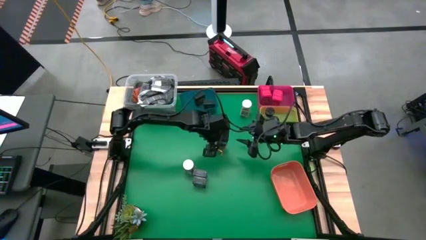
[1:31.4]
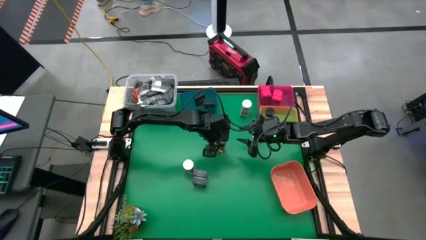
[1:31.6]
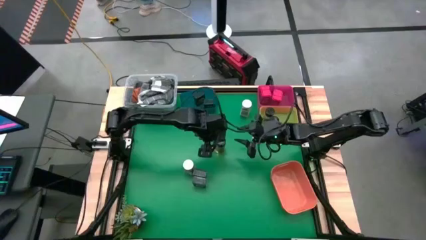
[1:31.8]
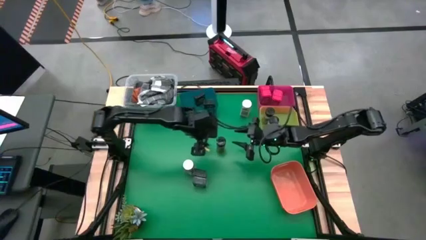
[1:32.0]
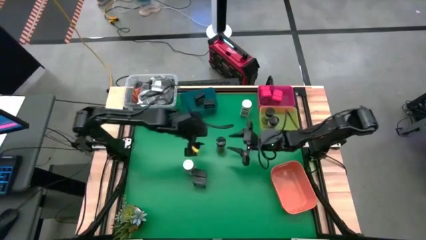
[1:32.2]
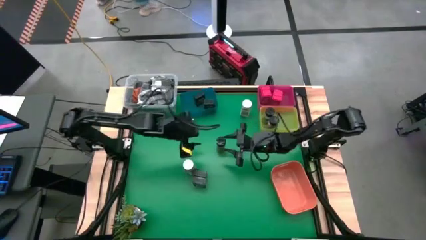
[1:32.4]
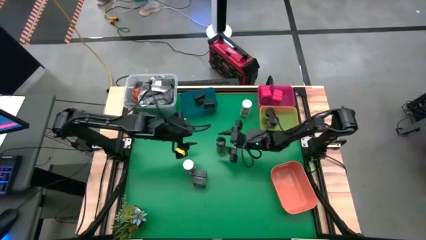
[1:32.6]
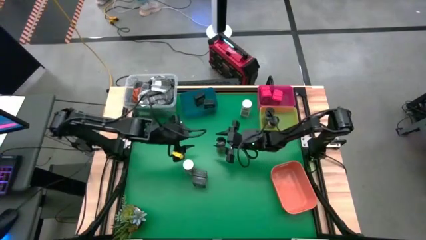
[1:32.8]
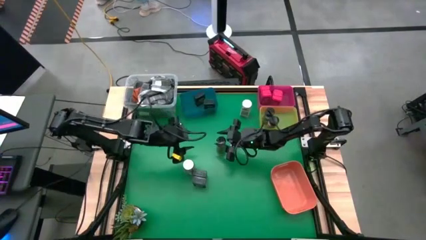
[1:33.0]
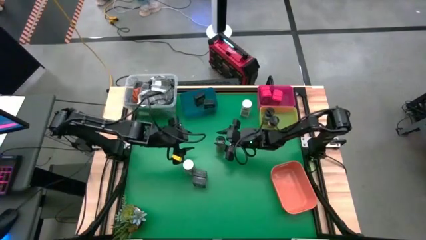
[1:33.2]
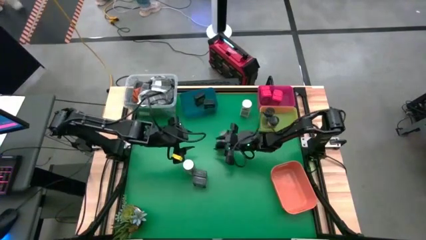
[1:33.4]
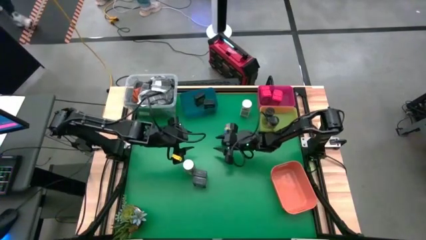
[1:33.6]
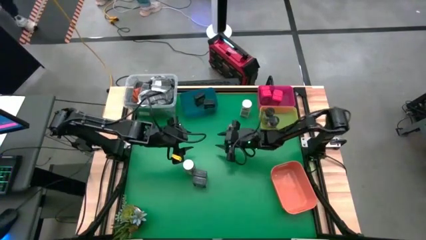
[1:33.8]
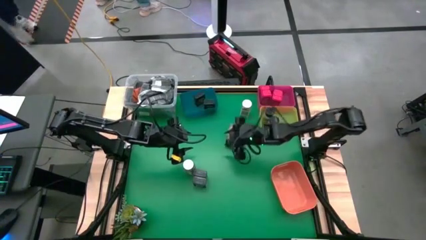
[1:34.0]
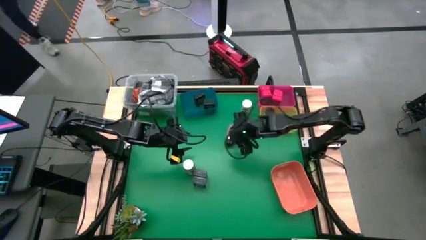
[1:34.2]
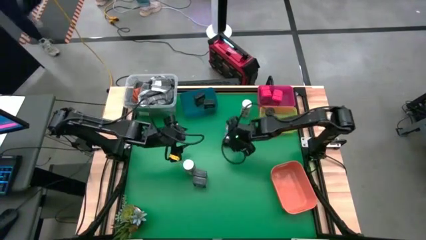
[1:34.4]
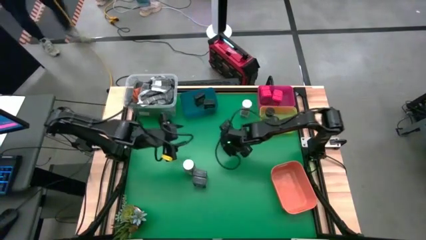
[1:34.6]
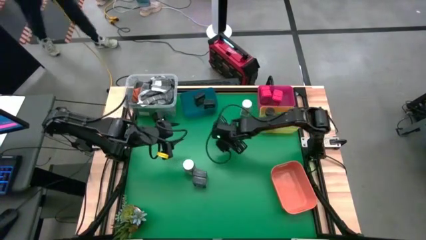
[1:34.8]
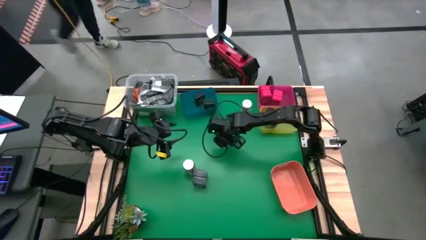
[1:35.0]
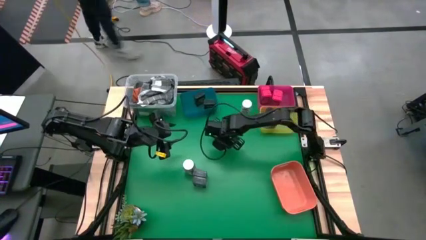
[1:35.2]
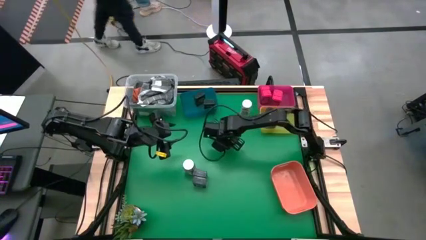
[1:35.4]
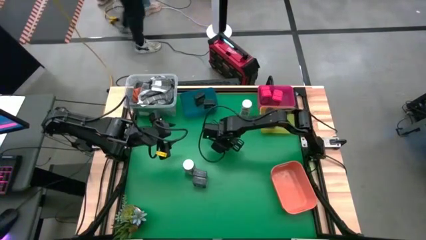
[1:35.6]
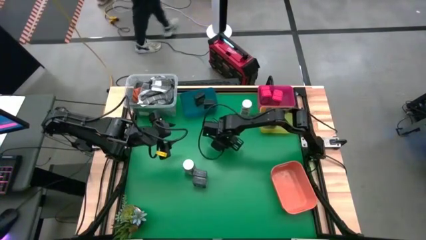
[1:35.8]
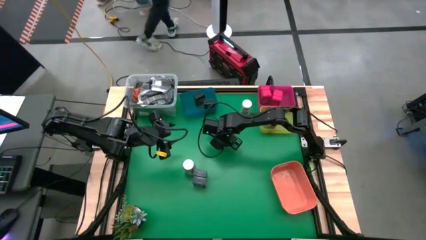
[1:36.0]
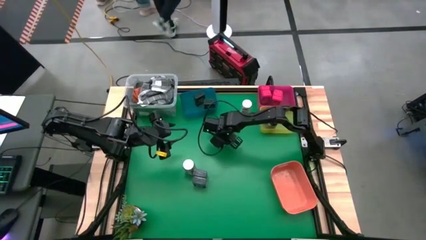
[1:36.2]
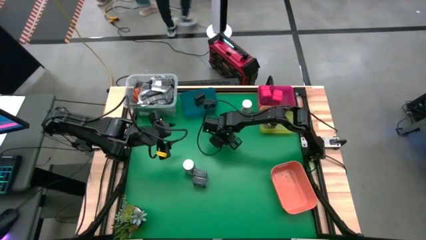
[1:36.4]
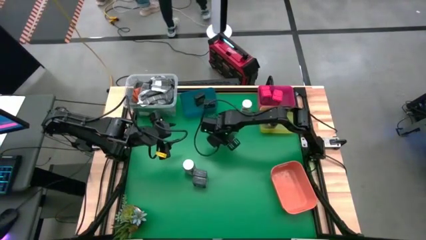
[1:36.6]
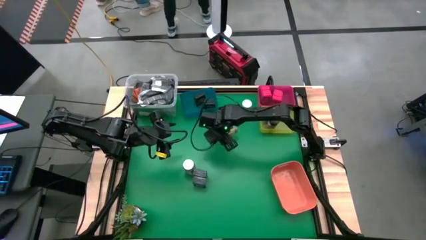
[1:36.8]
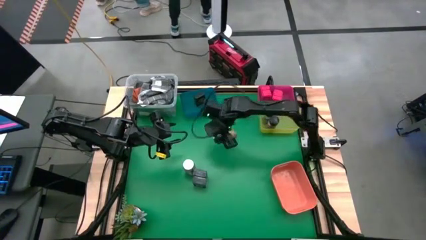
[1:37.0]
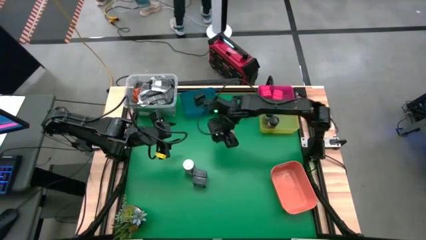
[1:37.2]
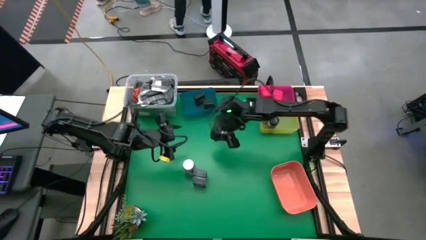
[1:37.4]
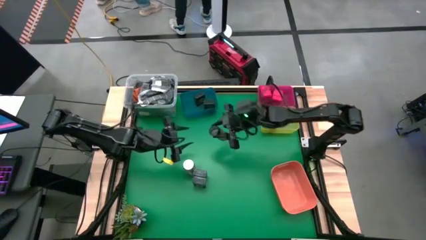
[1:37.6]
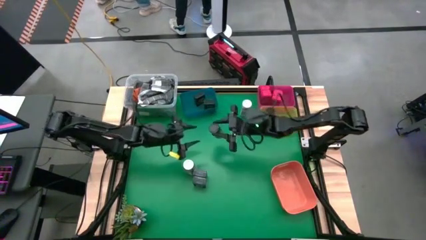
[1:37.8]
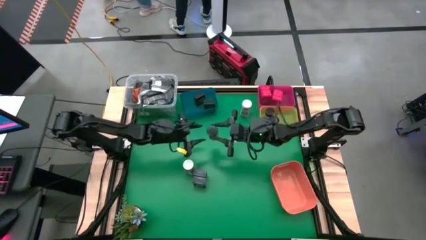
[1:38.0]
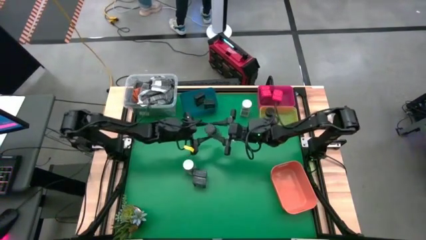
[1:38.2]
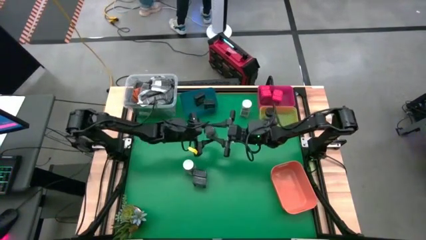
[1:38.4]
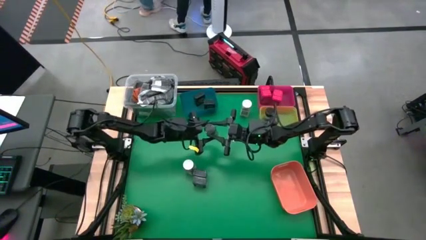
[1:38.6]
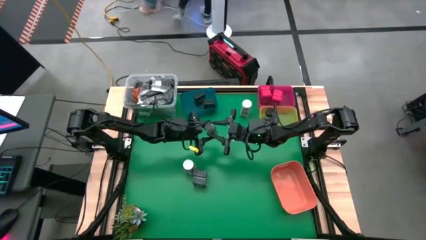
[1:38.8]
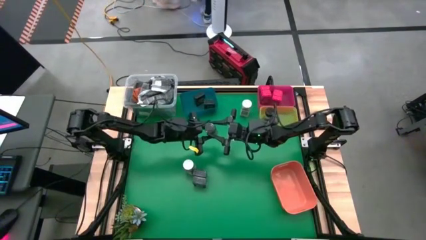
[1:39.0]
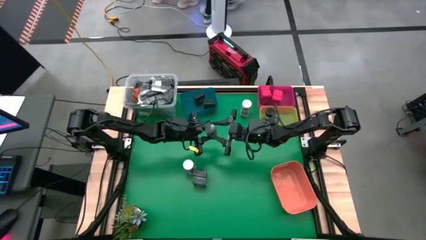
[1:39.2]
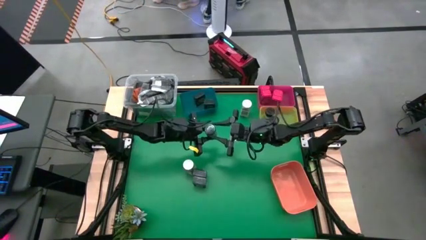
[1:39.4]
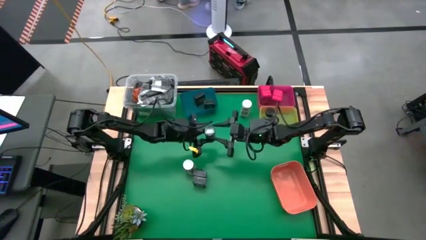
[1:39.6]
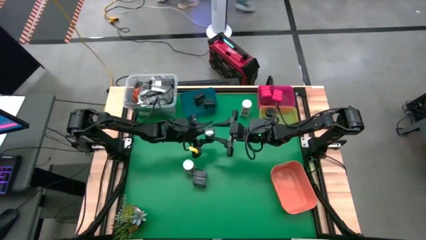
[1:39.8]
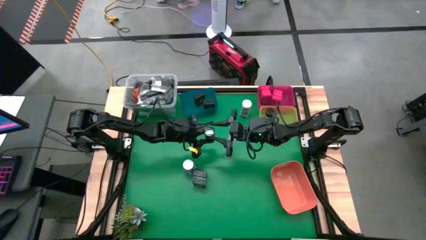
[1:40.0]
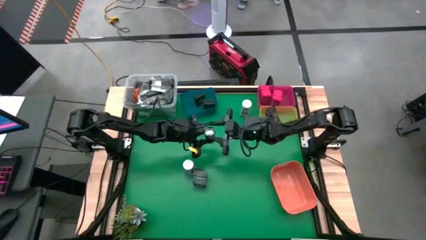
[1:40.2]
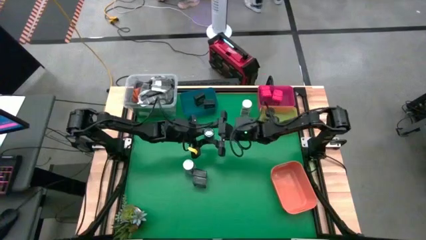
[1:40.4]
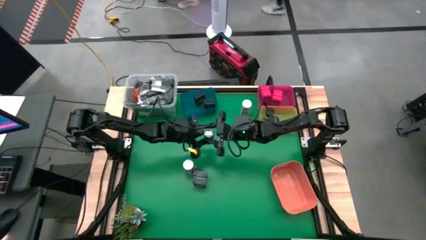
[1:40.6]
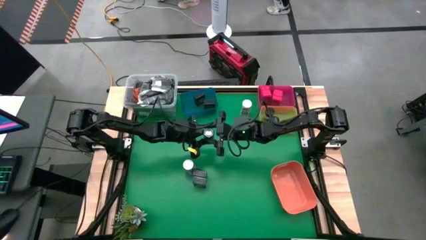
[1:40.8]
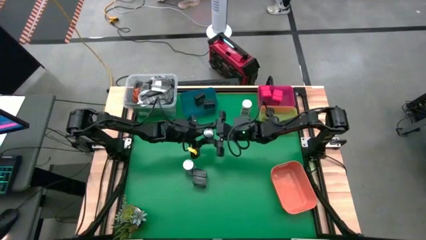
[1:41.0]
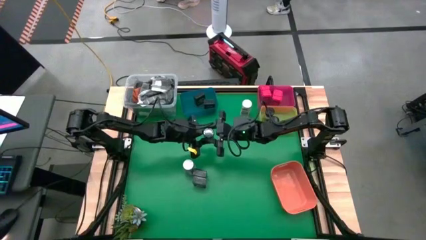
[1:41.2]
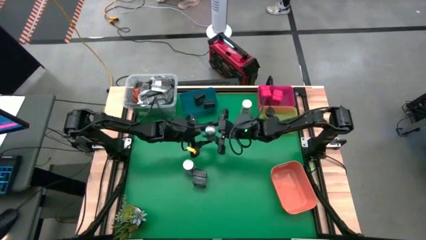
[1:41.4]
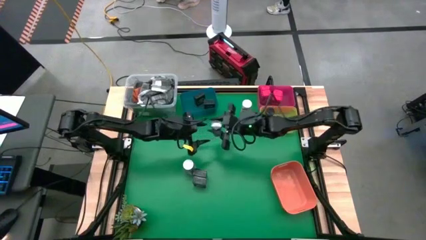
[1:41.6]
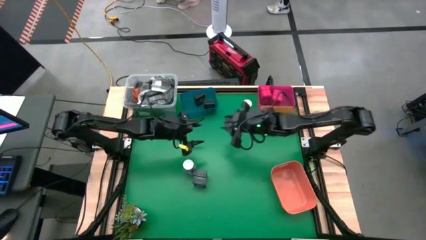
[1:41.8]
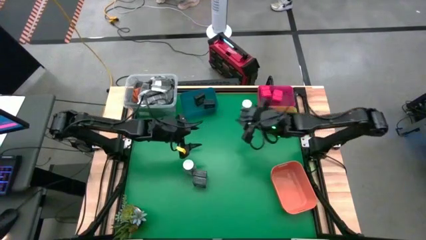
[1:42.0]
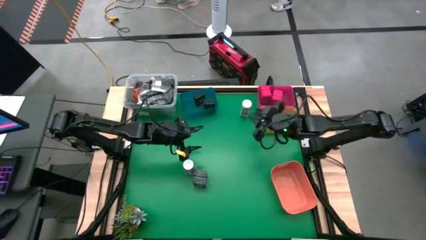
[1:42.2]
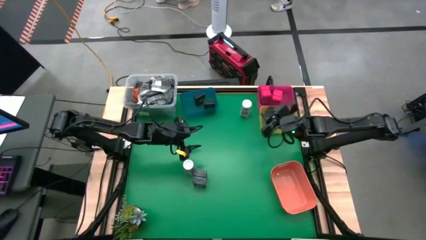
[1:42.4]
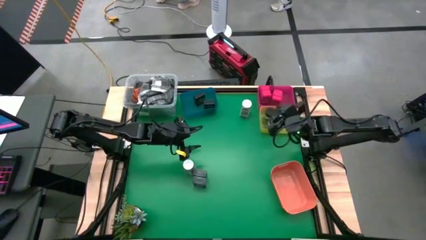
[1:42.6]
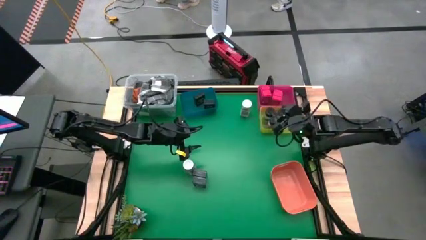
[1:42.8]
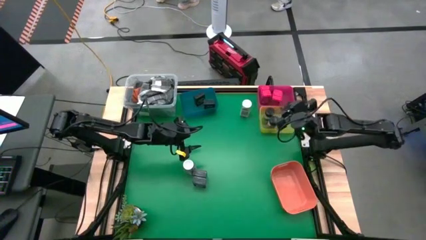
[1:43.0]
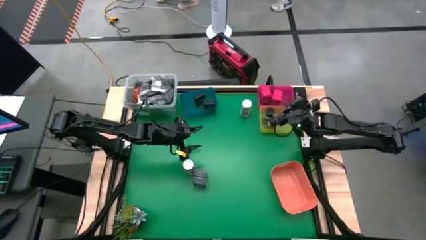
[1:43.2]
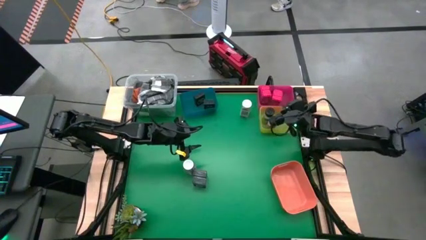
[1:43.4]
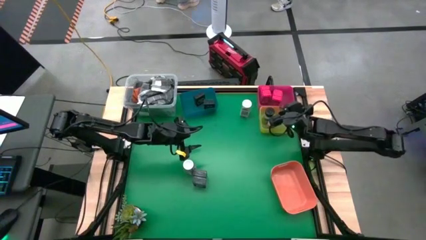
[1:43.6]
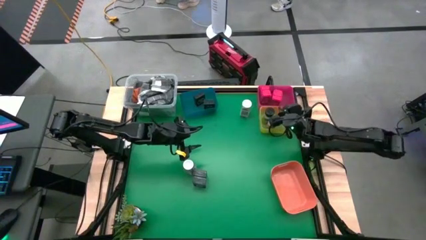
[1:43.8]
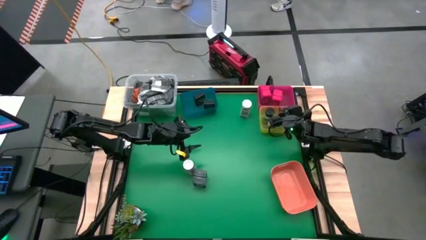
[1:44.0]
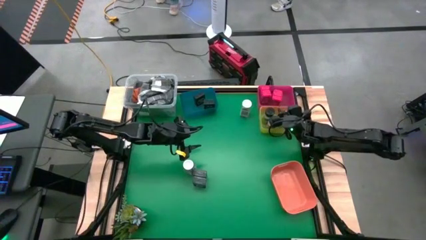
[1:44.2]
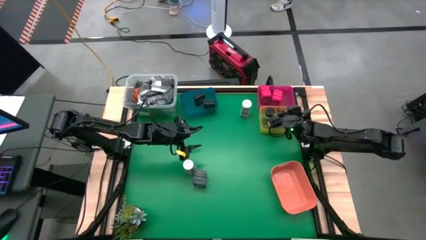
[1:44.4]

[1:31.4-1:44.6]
Task: Sort spices by type
Put the black seasoning from the middle into the yellow bin
